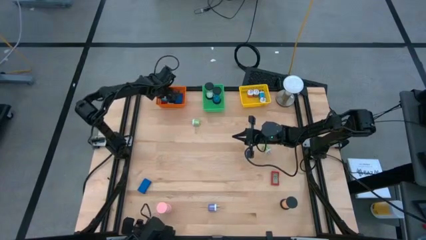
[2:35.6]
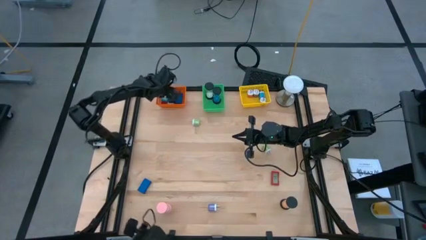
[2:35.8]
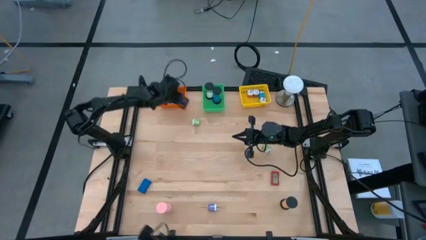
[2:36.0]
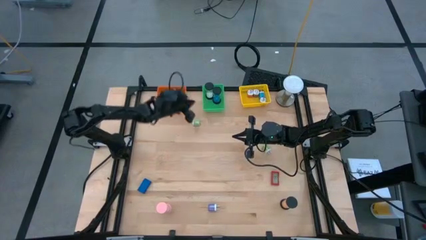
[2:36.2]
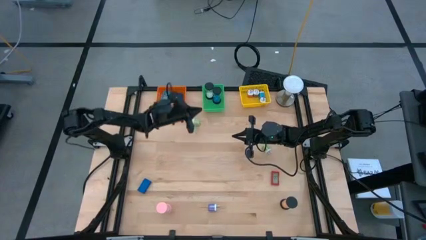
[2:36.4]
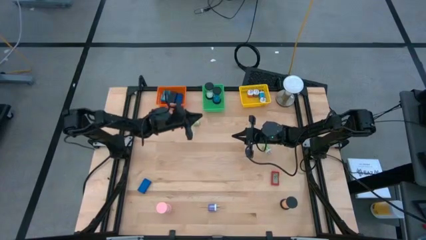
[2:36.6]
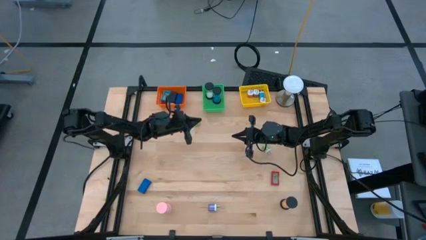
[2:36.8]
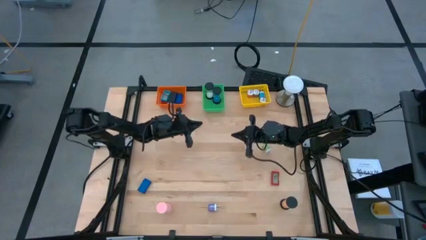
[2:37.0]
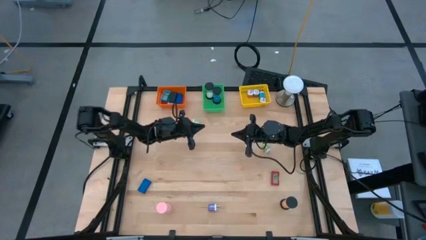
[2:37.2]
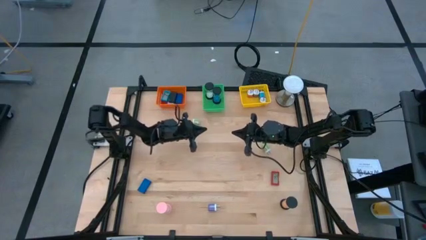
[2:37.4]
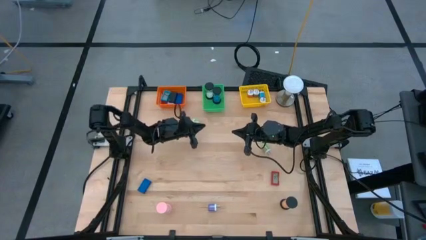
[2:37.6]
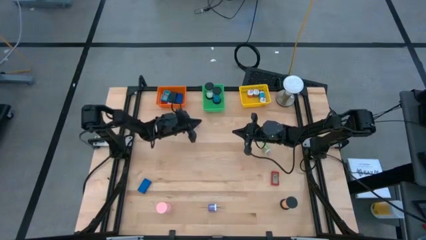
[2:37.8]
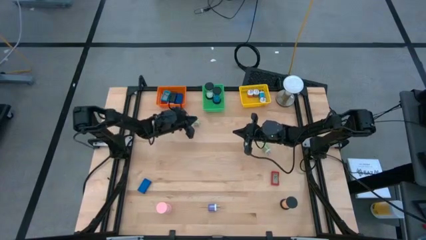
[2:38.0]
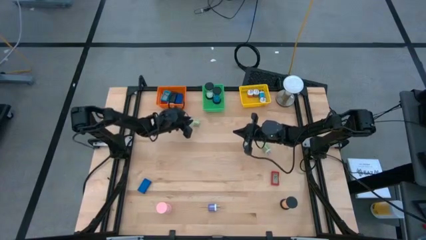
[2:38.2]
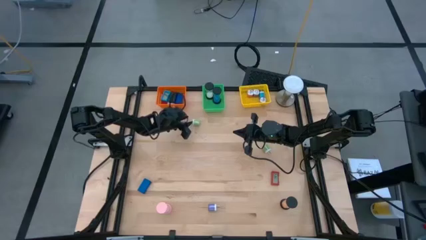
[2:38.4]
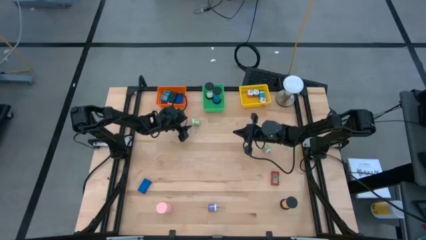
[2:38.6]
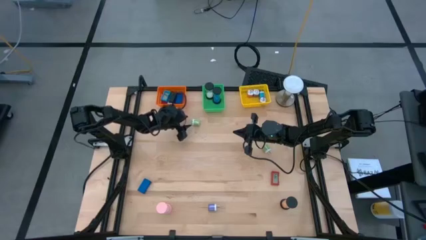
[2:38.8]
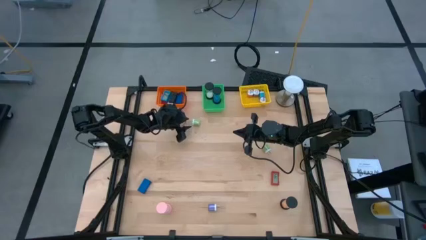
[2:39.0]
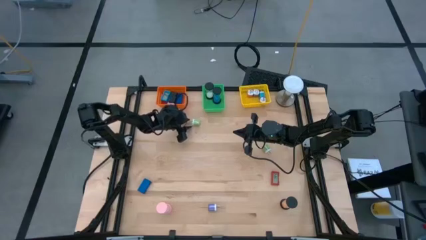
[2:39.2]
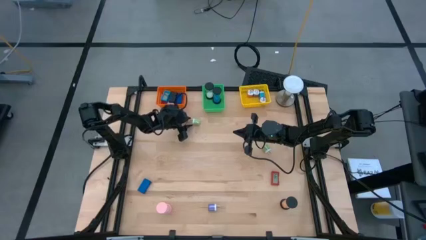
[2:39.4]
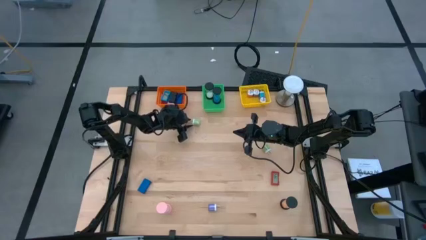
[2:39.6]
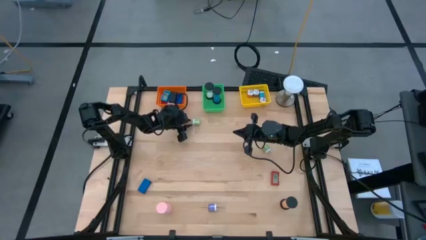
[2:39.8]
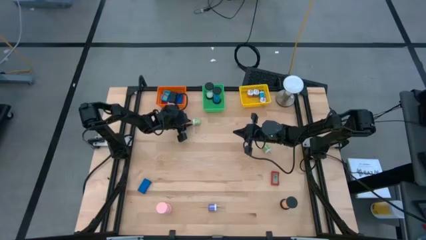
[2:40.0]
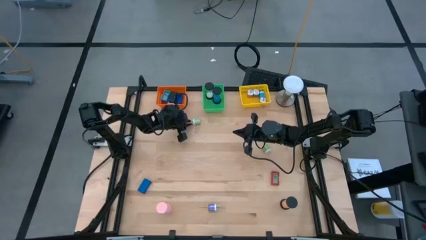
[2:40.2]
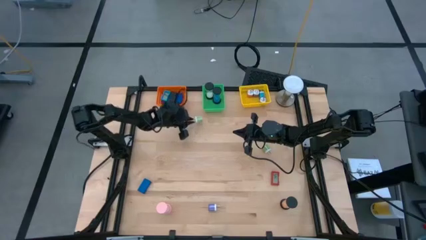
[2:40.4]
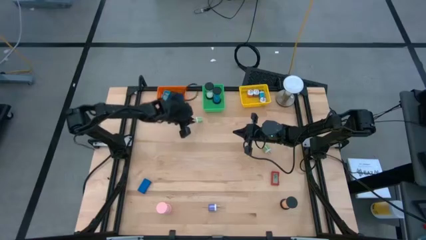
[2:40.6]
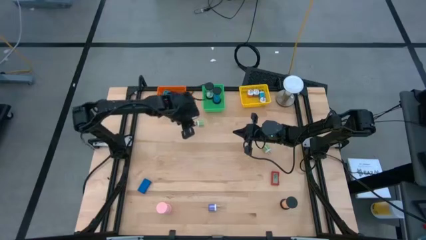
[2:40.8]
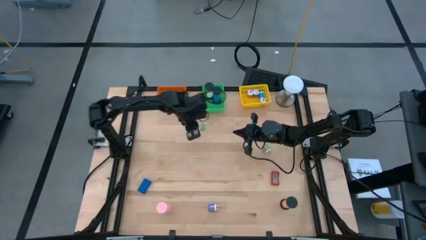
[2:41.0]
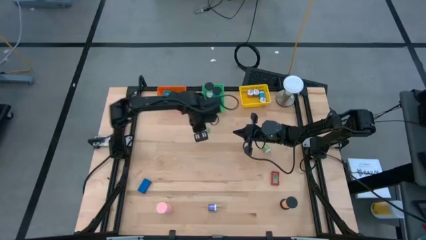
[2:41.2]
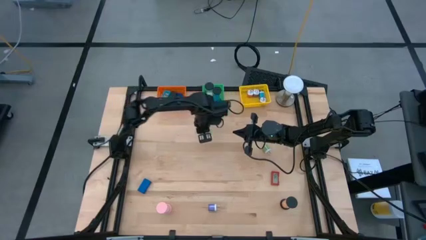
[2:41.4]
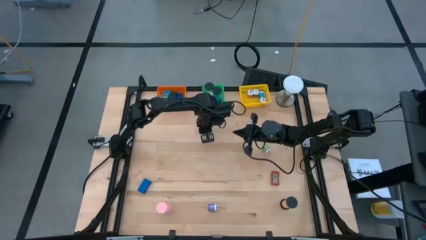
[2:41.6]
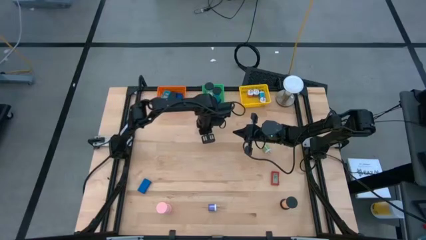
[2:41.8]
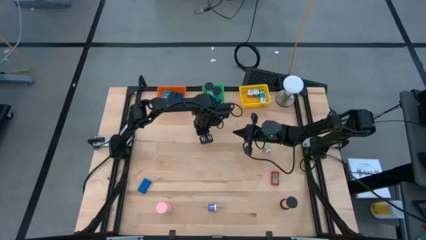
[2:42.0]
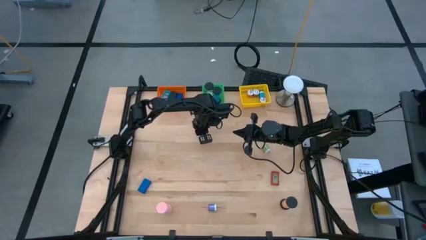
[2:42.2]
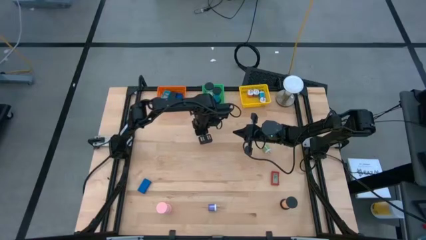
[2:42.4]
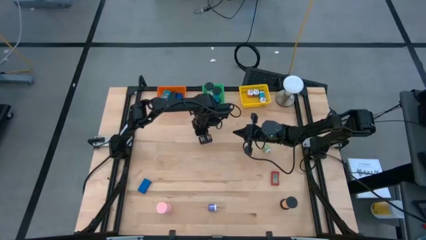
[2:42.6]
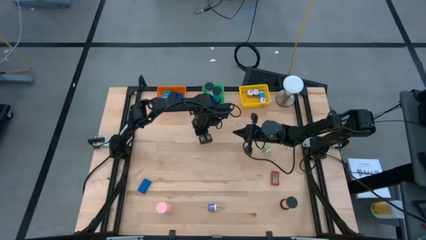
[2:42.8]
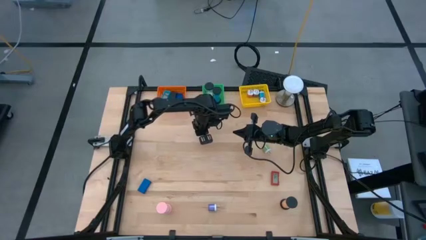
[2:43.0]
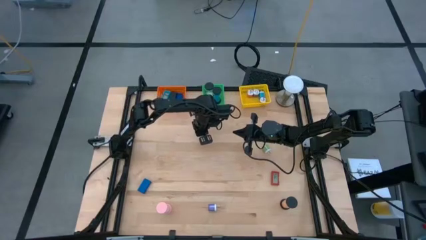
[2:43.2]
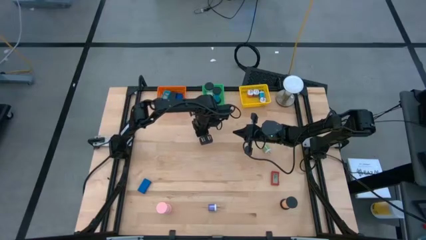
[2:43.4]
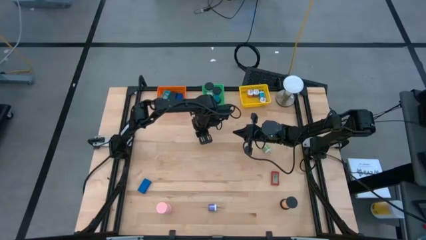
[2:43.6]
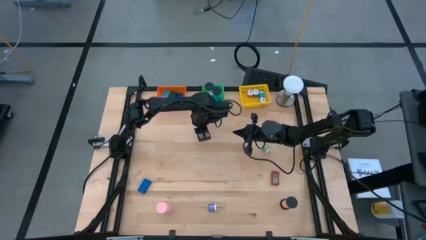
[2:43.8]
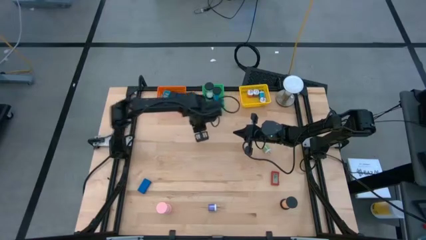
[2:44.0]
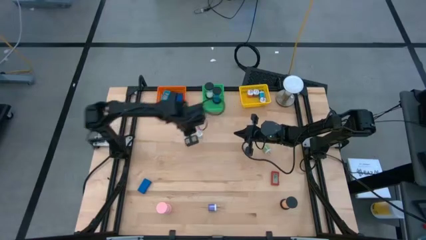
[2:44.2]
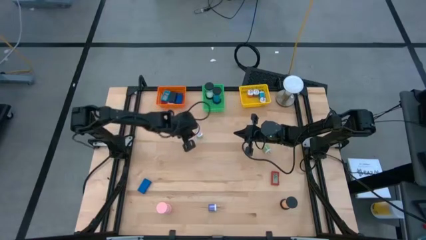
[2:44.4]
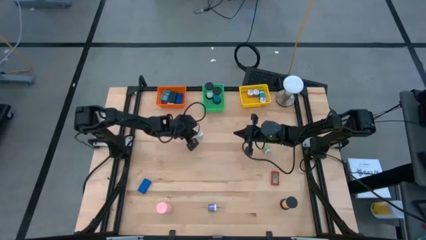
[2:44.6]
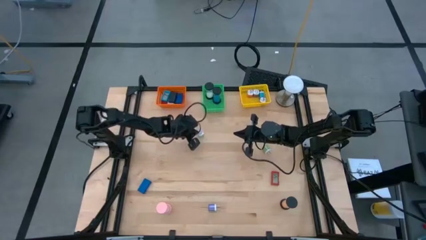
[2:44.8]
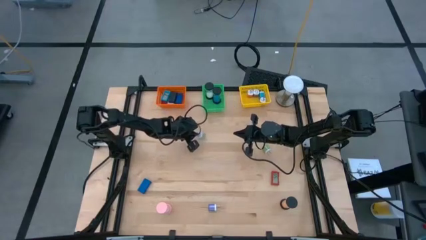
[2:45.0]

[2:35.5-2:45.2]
Task: Pick & Place Office items
Put the top green charger adapter into the yellow bin
